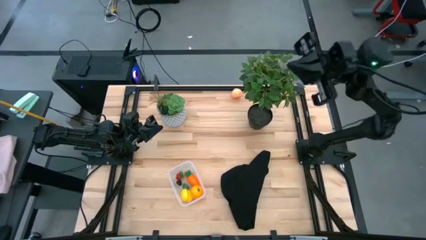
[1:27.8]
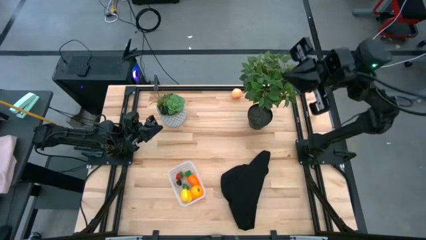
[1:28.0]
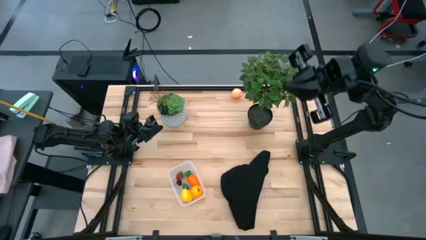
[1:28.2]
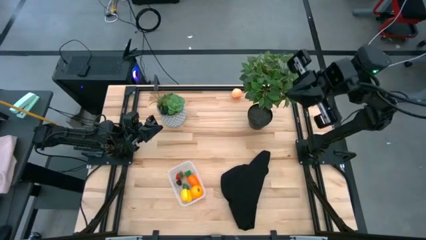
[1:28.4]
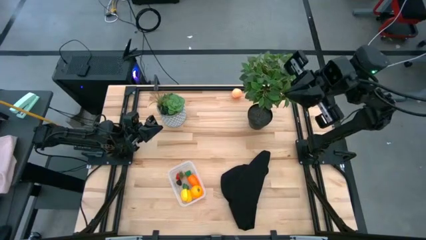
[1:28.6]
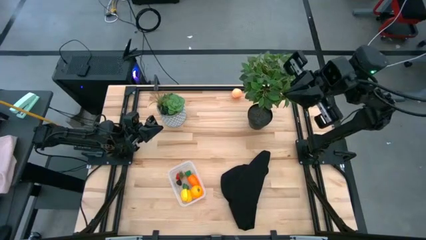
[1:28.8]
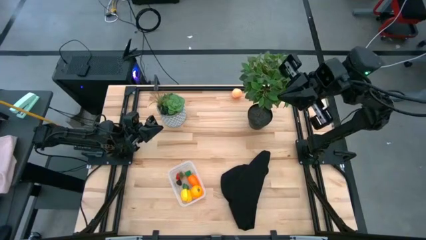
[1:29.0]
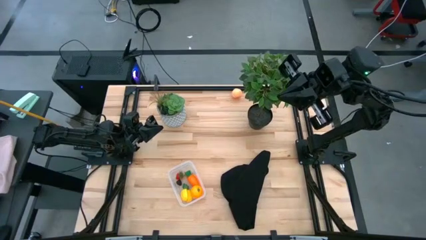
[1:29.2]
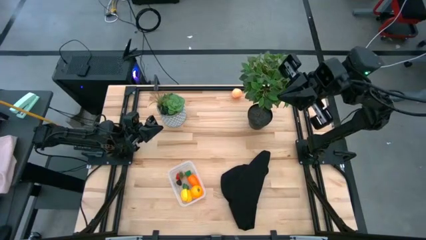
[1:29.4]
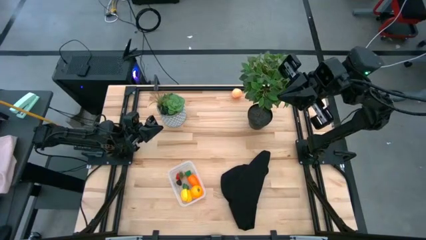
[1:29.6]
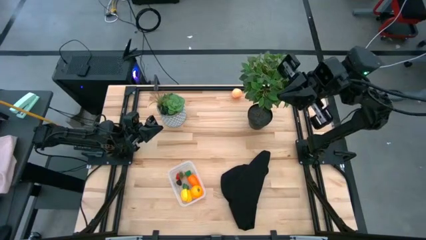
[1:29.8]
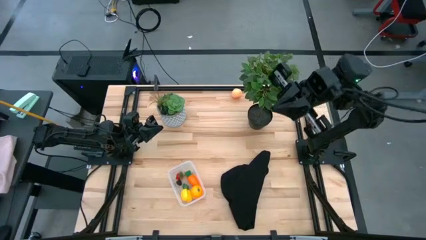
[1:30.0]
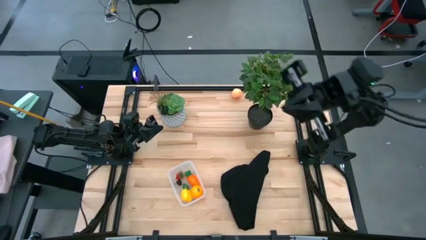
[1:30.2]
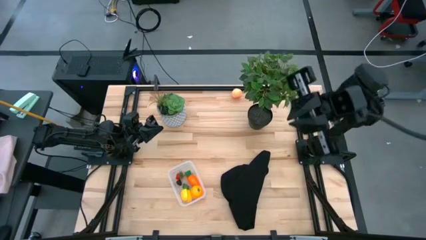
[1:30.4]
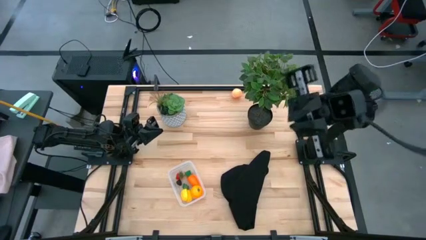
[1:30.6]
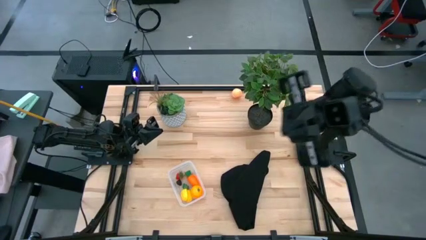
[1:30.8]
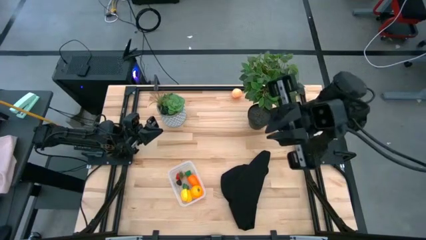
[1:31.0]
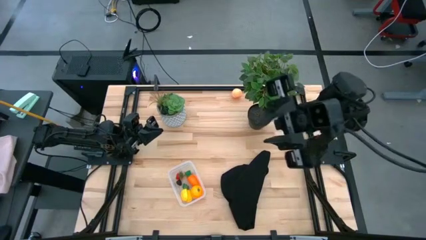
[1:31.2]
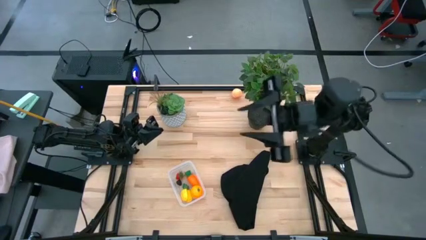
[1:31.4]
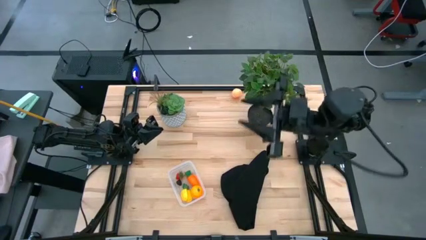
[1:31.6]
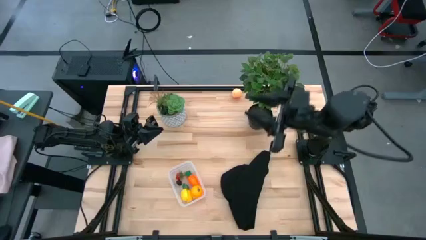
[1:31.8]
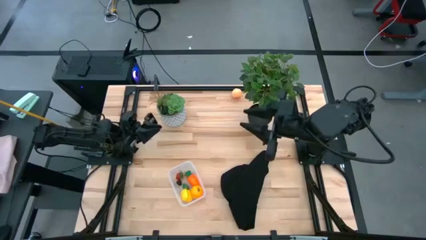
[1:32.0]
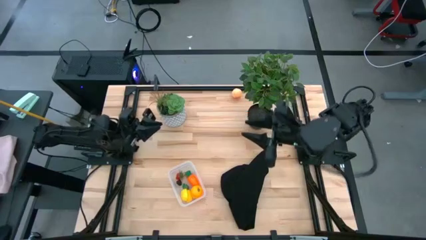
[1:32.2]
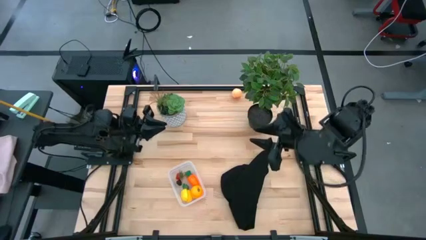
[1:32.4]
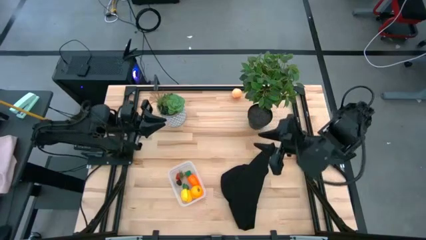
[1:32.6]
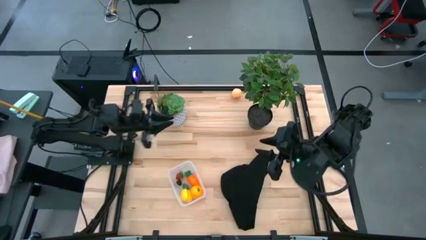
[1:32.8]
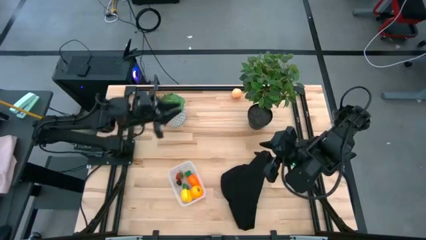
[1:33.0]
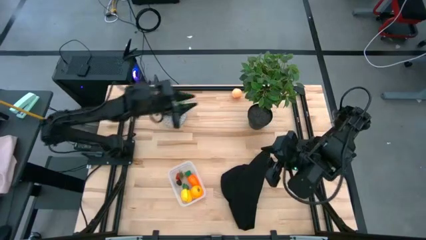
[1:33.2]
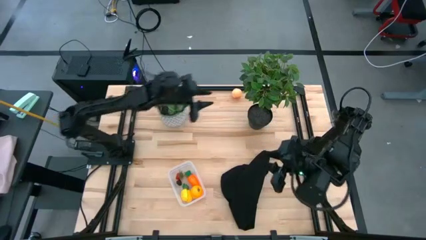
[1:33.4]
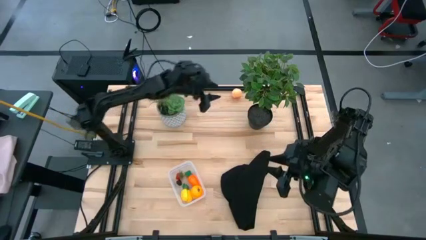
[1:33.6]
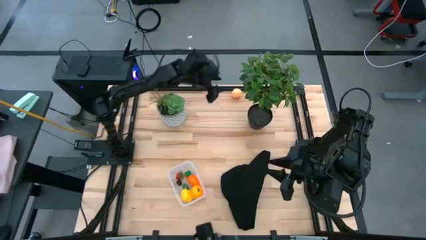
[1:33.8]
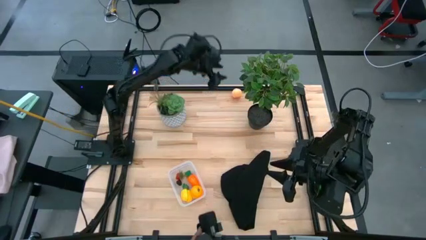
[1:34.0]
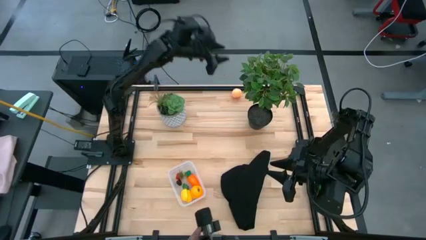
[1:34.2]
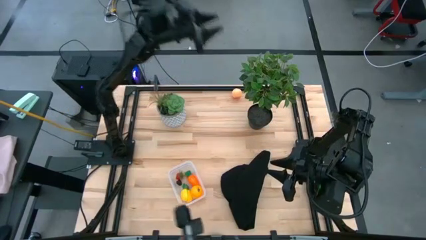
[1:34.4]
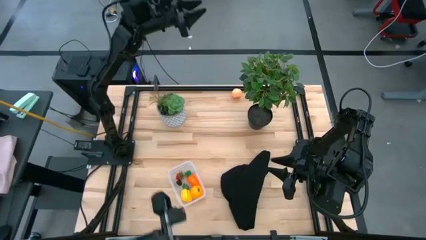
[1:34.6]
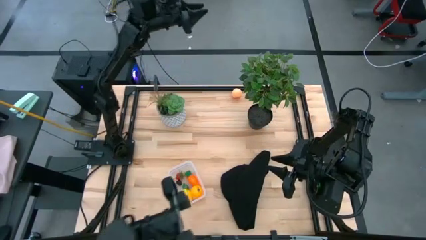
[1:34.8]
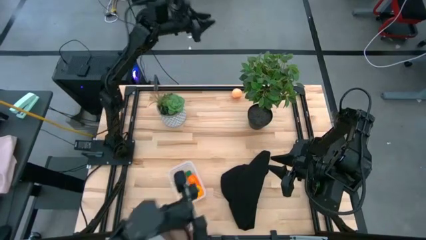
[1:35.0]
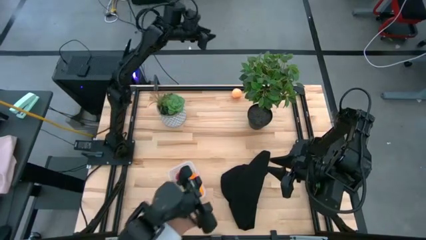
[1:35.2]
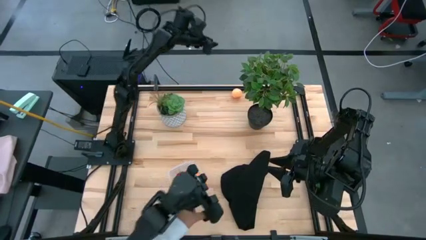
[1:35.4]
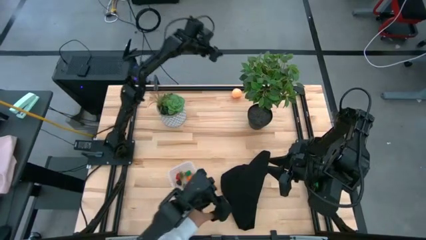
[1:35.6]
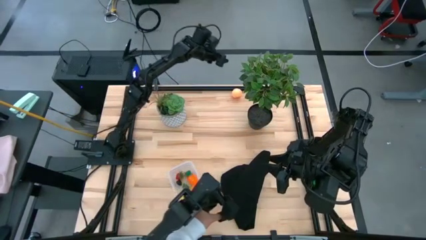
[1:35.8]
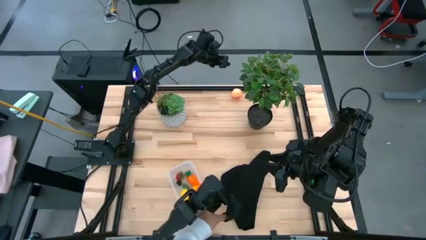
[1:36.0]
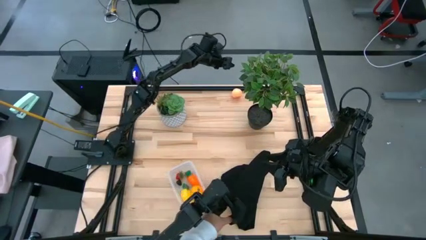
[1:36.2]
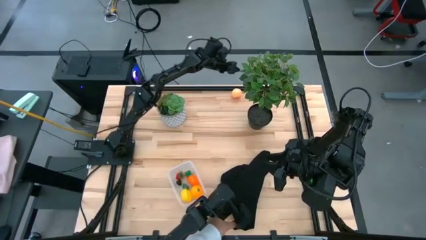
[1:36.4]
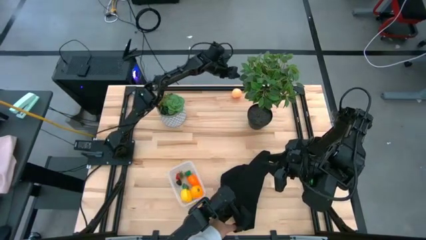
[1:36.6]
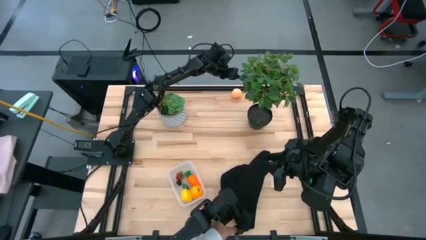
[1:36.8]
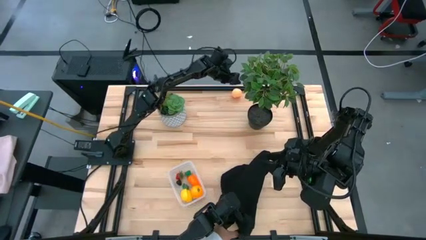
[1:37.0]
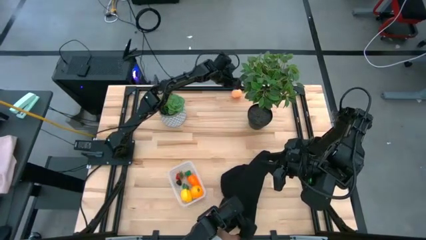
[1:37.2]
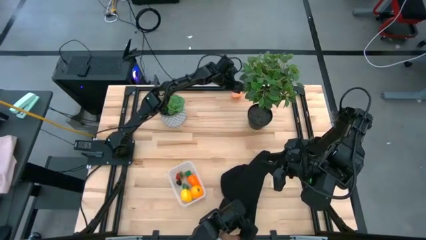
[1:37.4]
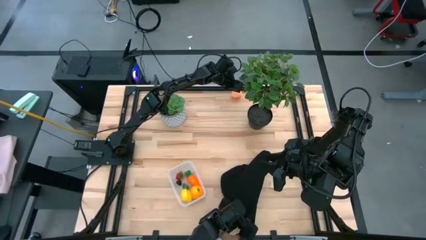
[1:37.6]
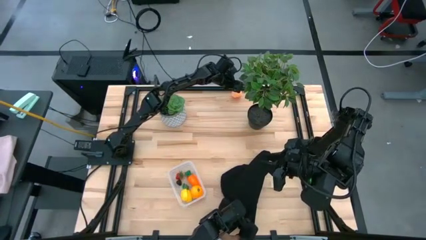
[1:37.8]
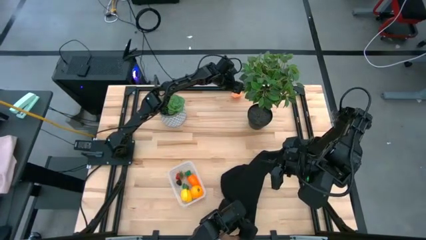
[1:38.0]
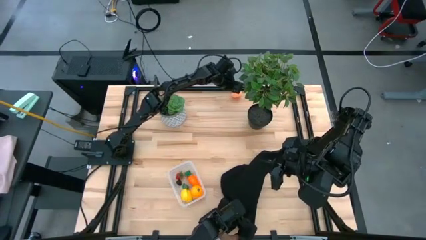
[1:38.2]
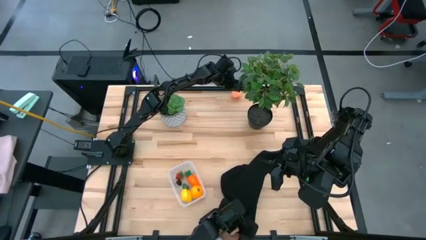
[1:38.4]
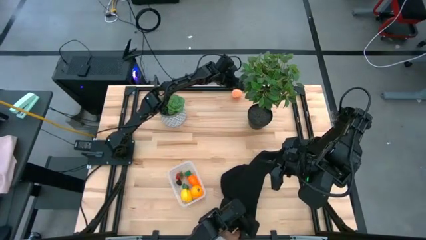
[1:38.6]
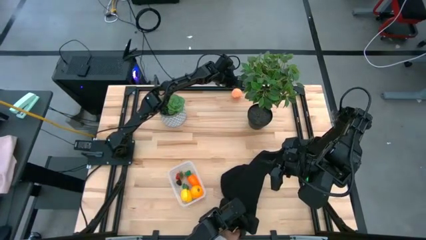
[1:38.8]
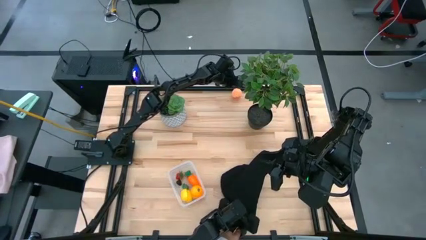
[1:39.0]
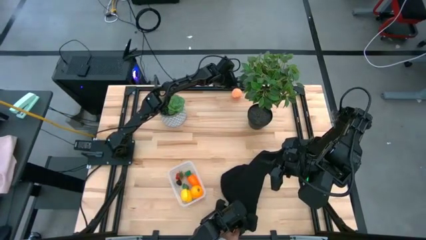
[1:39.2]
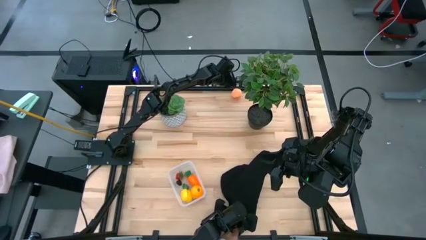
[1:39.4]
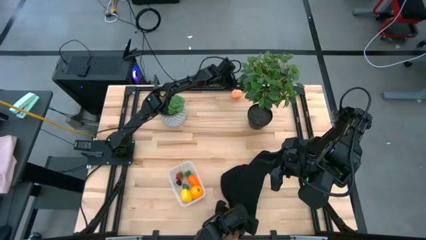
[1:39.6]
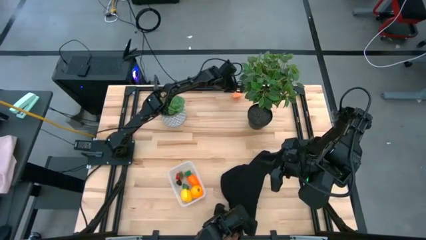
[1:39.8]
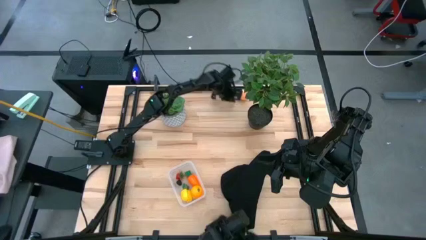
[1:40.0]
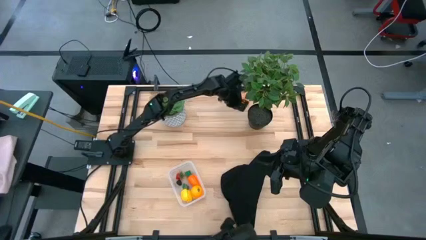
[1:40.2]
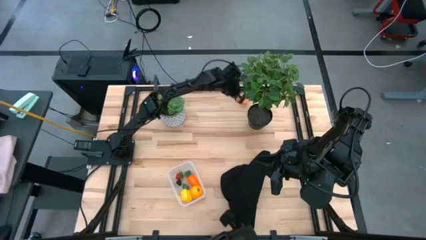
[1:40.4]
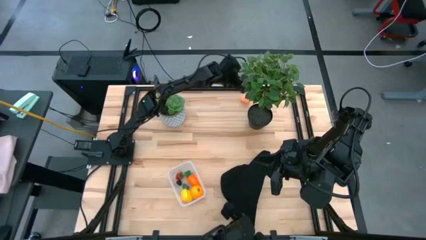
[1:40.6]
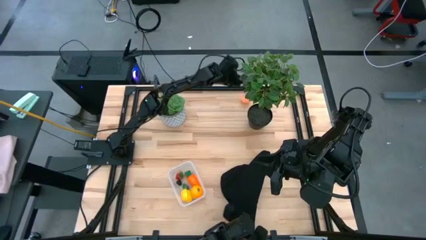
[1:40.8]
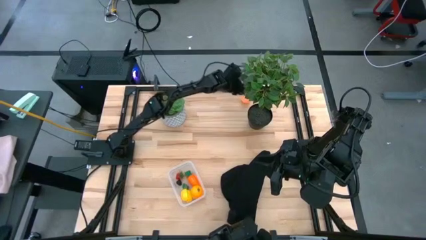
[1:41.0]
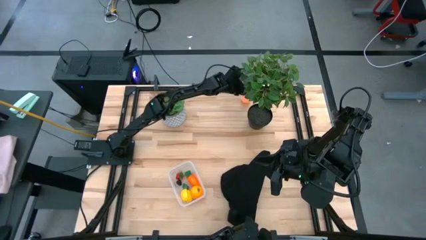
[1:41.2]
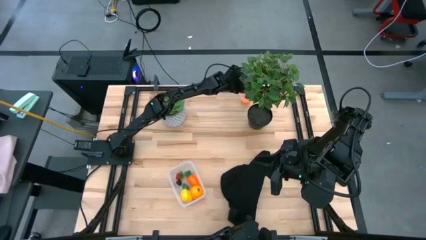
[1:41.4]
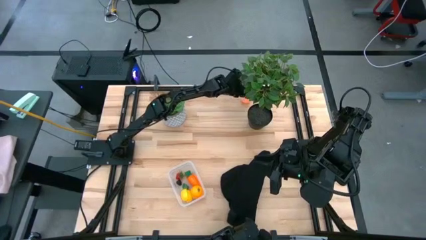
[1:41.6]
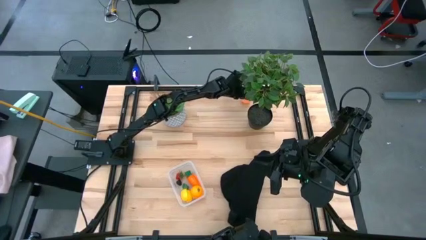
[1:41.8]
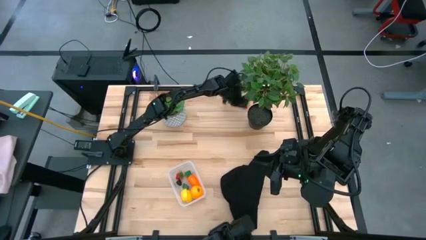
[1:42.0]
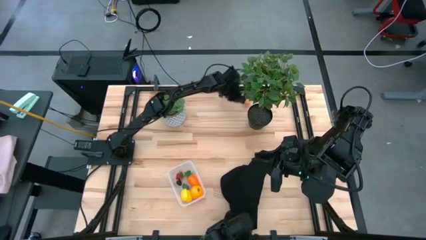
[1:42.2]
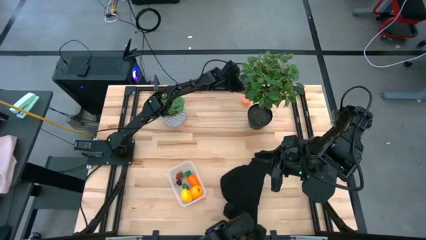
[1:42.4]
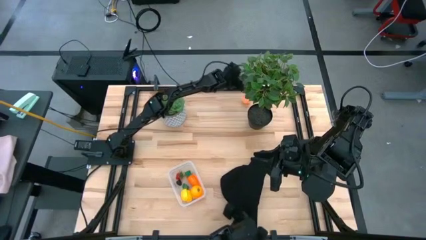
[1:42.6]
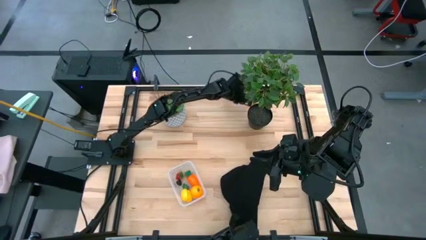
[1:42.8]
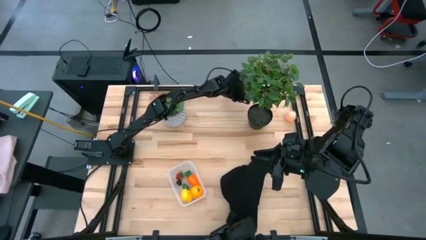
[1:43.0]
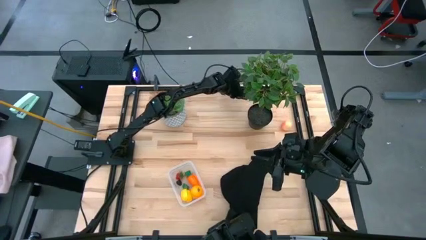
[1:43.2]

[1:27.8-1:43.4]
Task: Pick and placing Produce into tupperware
Put the peach into the transparent bin
